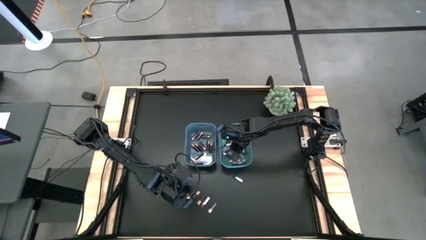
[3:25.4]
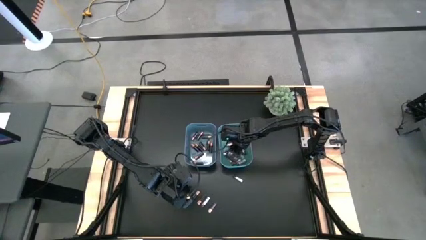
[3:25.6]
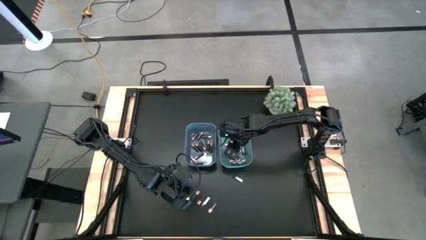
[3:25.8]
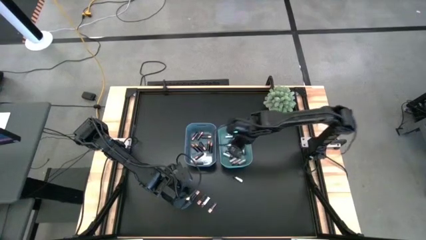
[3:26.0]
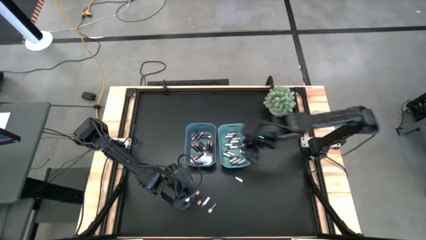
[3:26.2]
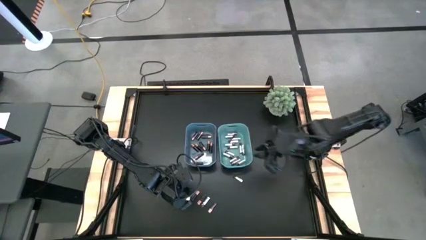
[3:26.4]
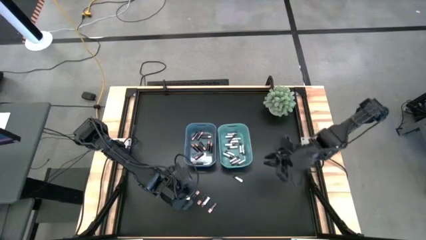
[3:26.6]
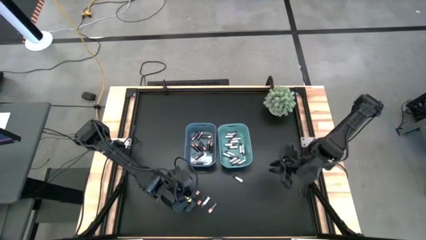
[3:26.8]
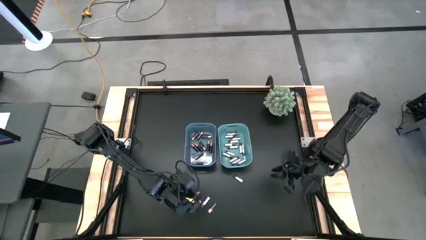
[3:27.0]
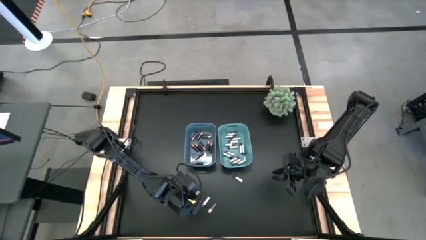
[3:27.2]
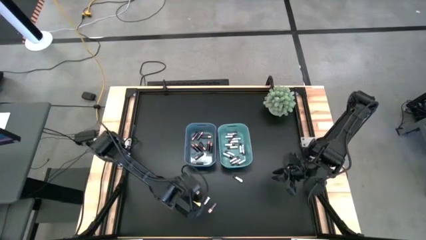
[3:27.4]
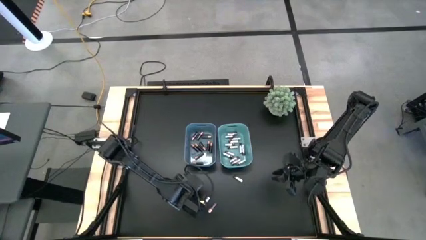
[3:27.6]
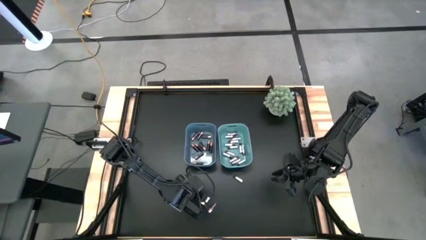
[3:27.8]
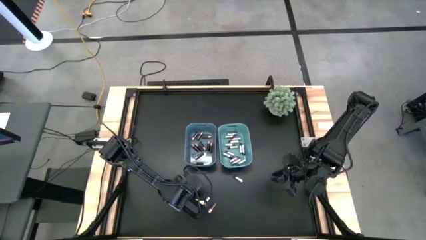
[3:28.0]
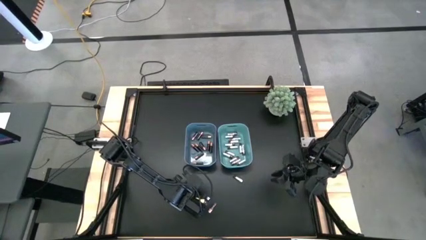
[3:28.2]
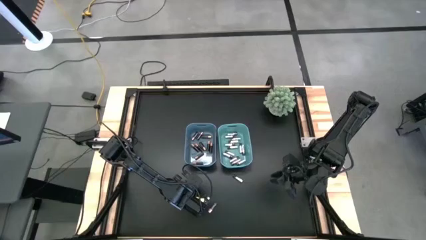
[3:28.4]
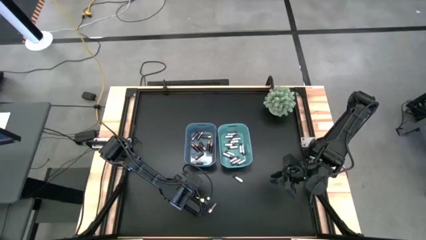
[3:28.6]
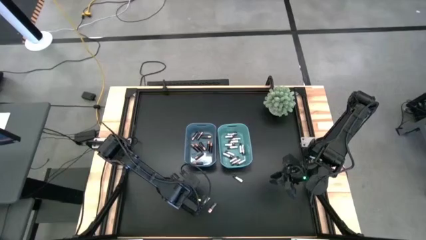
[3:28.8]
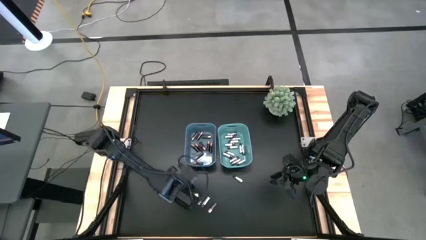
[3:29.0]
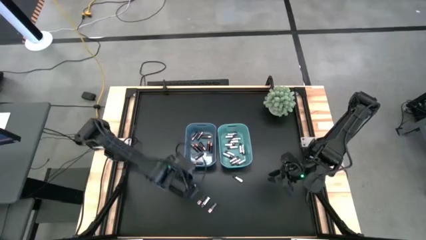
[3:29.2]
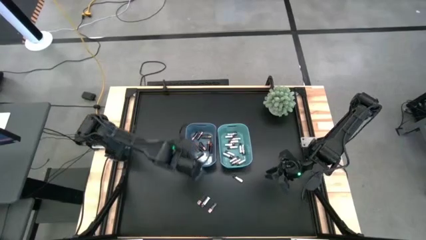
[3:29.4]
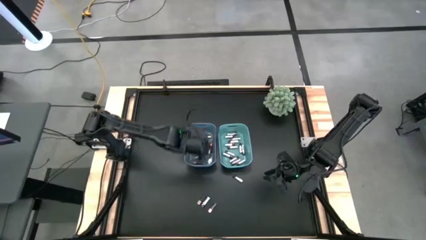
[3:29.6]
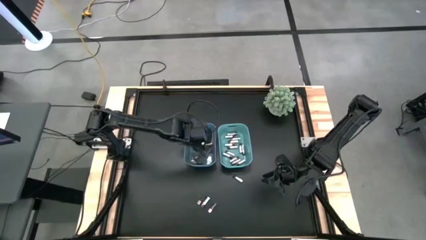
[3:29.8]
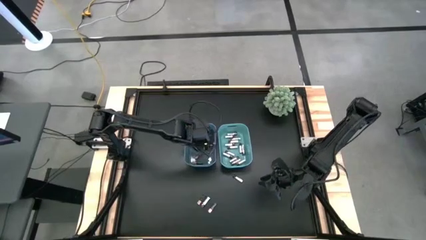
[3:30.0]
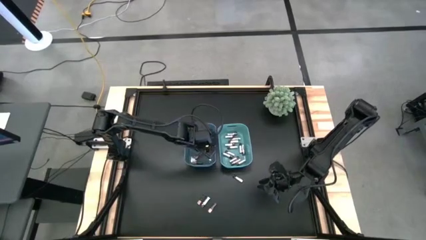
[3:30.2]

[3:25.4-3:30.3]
Task: Sort batteries
Put the black battery into the blue bin

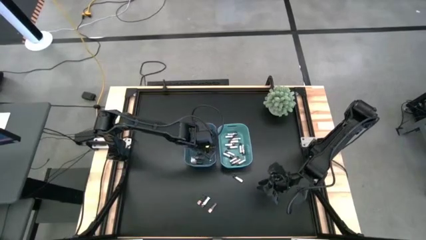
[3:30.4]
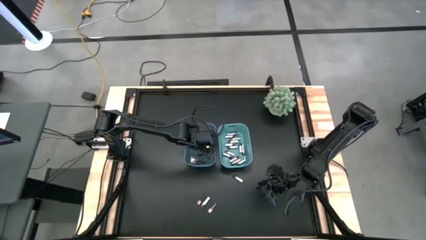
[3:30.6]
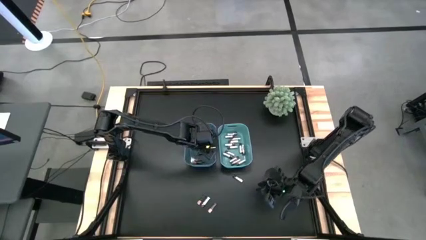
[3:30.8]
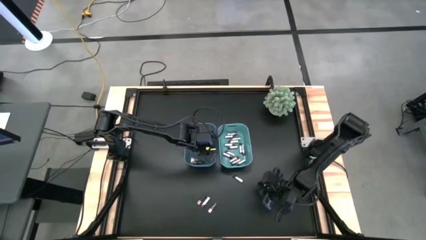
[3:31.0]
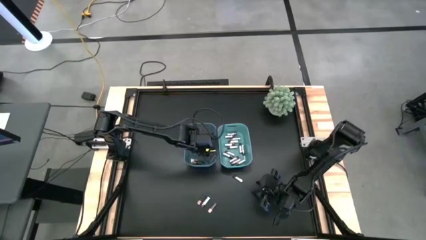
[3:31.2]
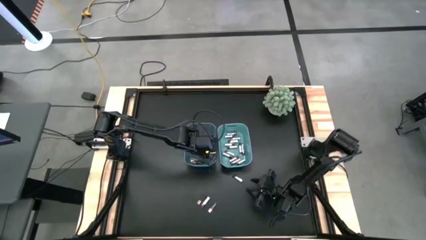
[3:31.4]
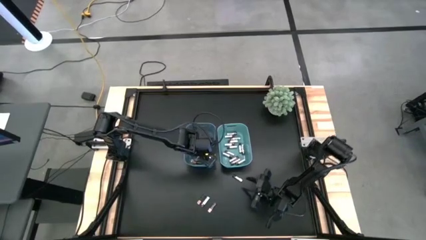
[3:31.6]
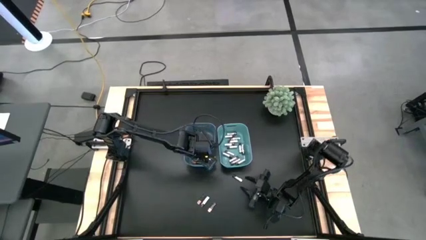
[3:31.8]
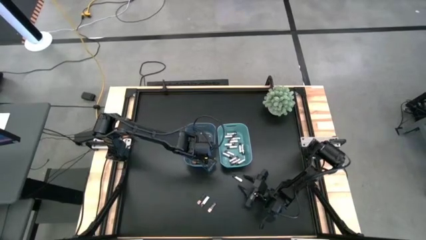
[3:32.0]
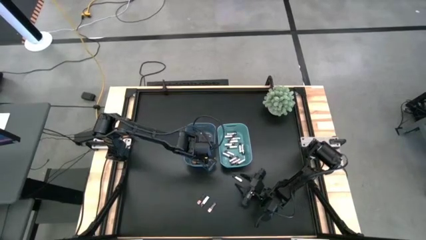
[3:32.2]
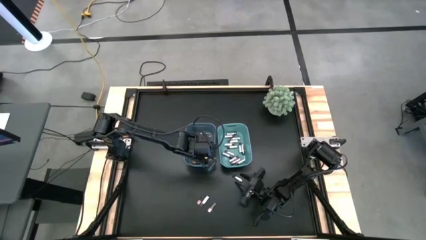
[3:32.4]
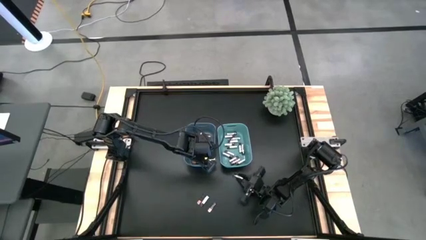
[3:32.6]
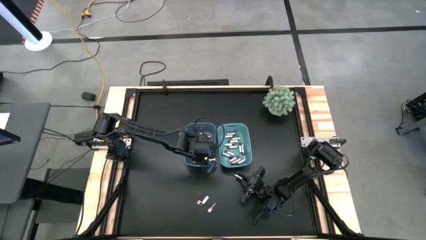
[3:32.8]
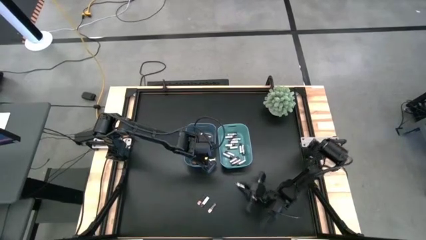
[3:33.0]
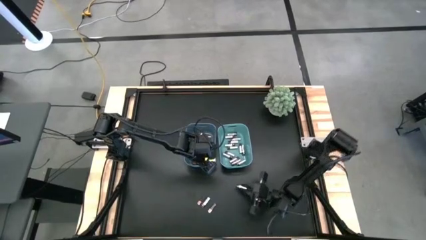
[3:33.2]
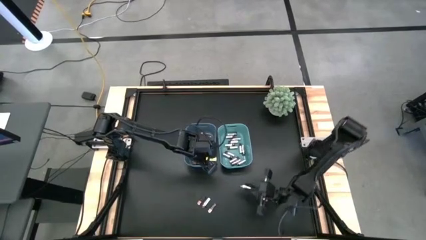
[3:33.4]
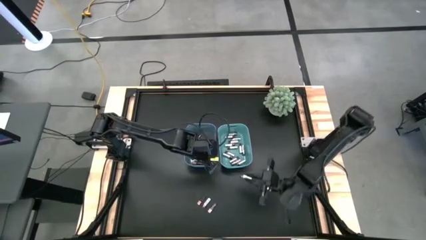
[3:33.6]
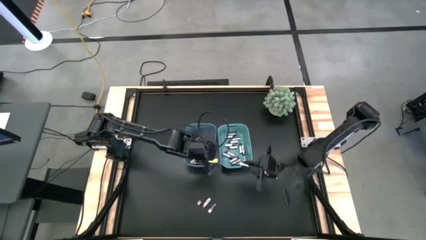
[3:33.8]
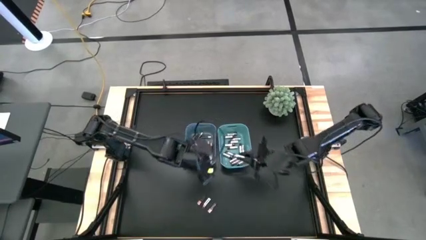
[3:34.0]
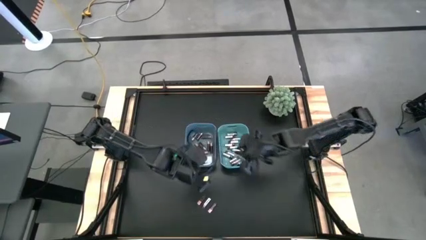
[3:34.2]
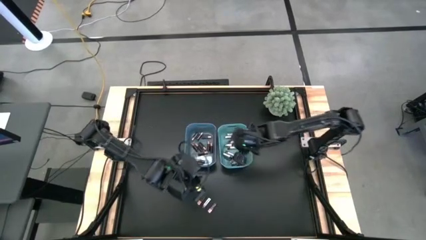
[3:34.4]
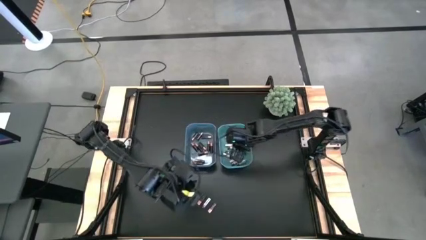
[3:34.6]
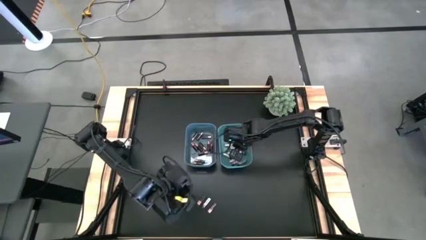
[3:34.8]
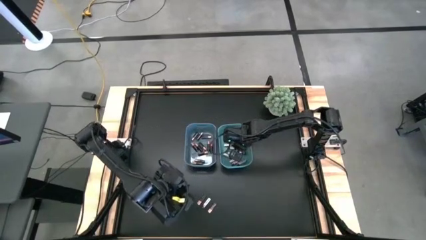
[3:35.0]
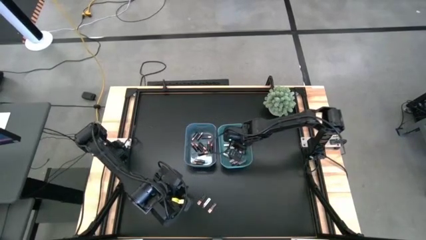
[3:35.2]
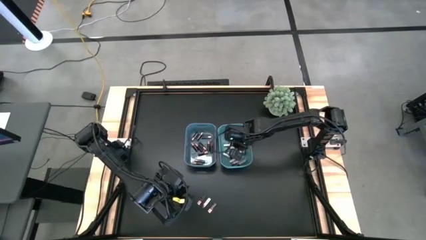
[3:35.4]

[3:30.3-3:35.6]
Put the white battery into the green bin

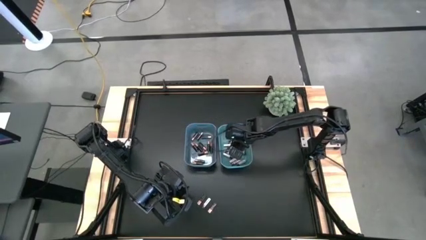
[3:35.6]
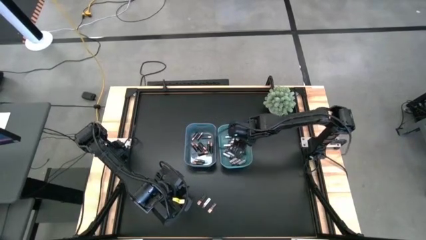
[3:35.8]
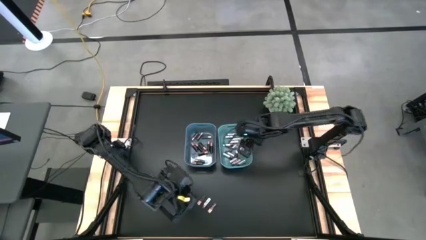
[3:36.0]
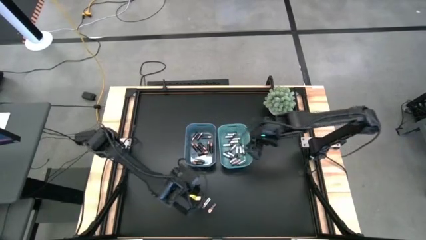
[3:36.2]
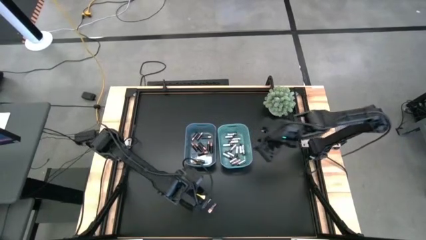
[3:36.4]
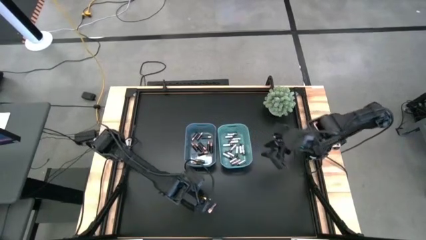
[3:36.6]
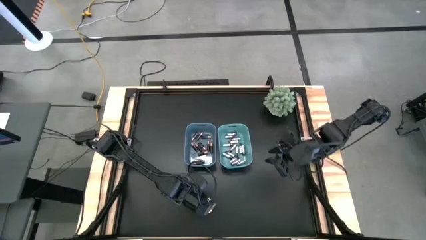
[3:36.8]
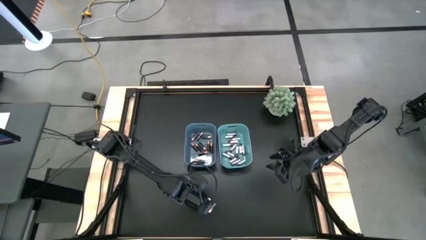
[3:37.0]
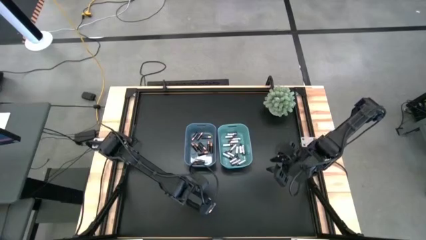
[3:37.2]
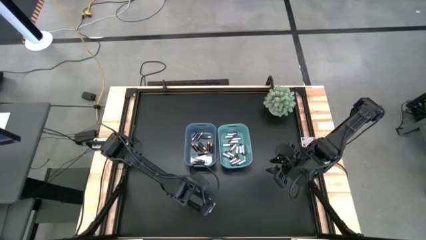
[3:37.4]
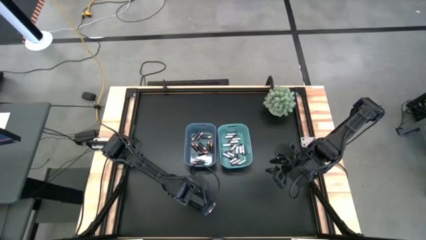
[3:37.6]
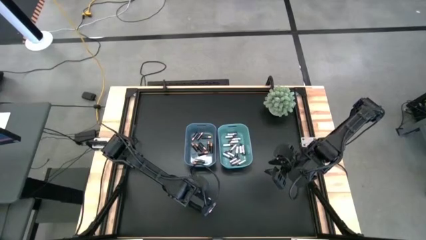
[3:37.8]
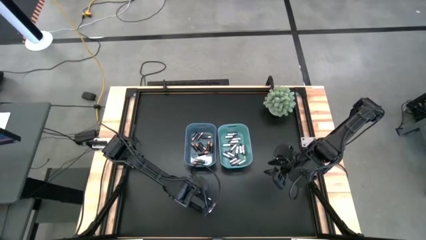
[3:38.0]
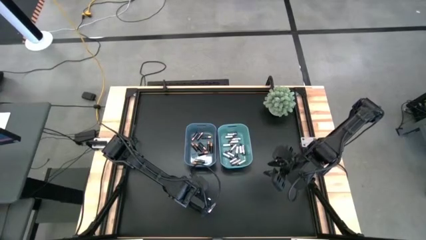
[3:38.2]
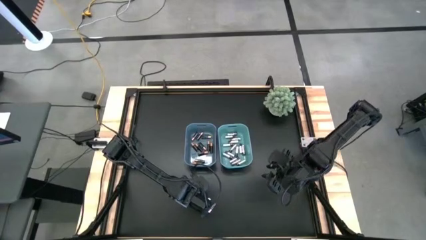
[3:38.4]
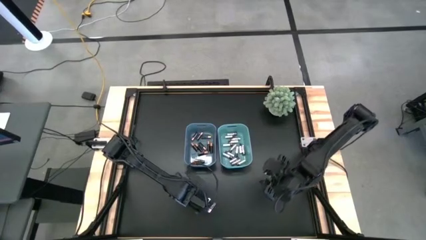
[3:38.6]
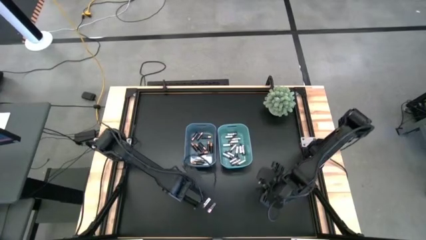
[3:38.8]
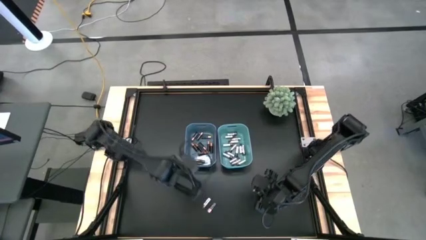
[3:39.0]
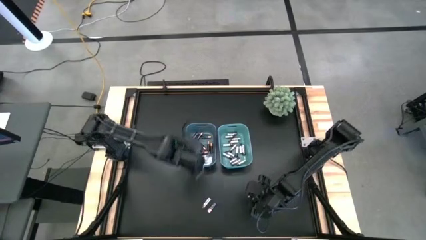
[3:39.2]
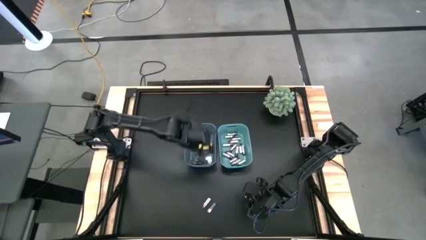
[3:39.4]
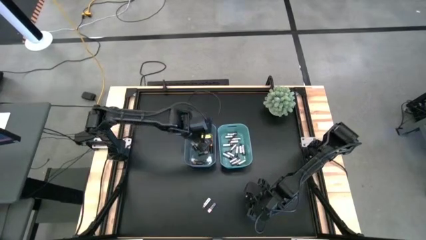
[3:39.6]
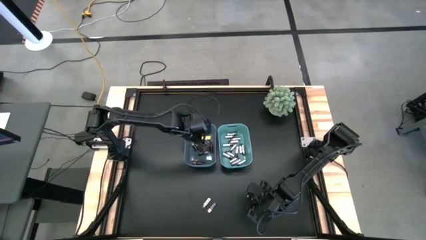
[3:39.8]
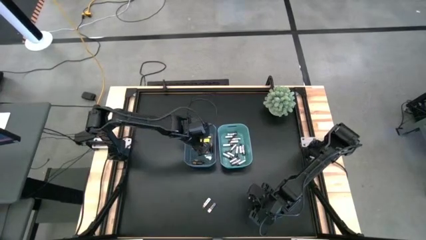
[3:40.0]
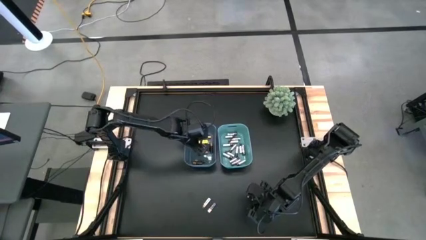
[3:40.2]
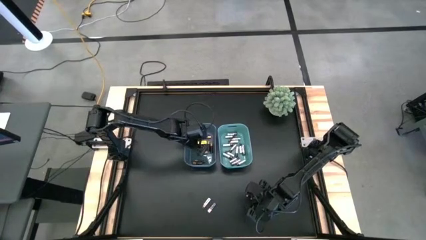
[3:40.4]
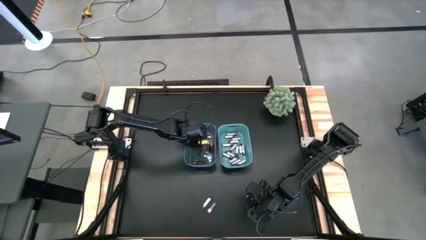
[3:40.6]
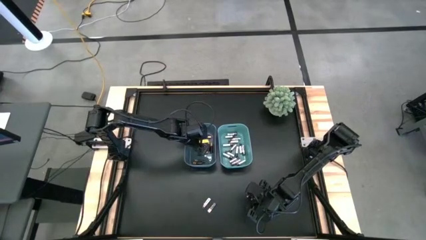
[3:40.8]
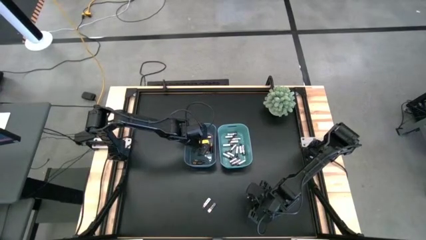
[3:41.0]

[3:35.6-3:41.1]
Put the black battery into the blue bin
